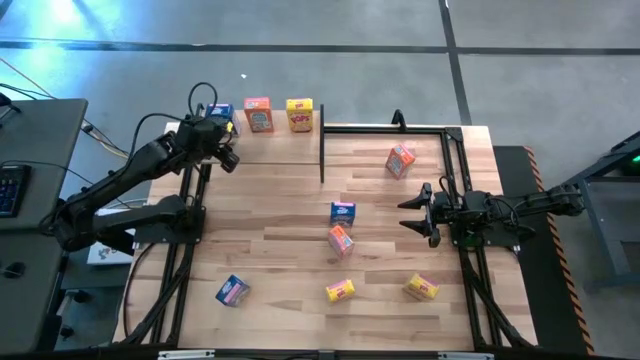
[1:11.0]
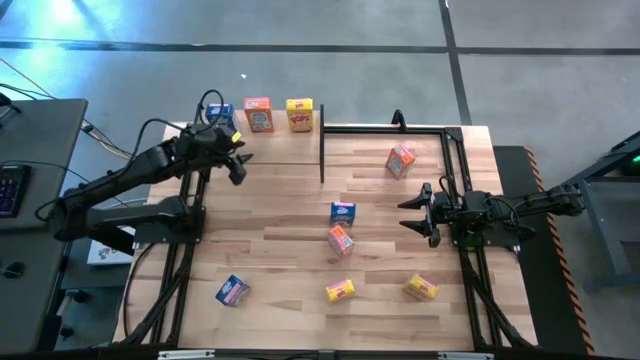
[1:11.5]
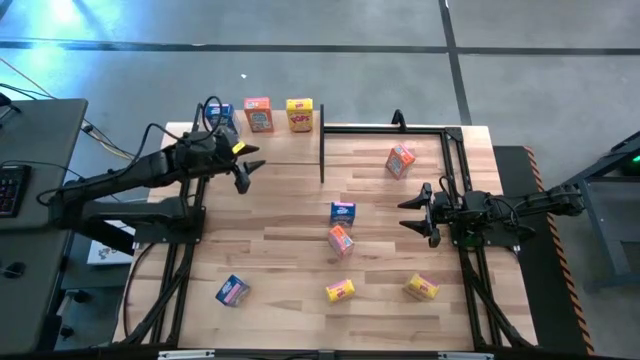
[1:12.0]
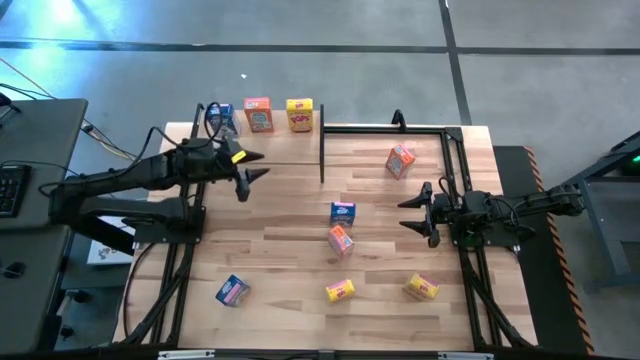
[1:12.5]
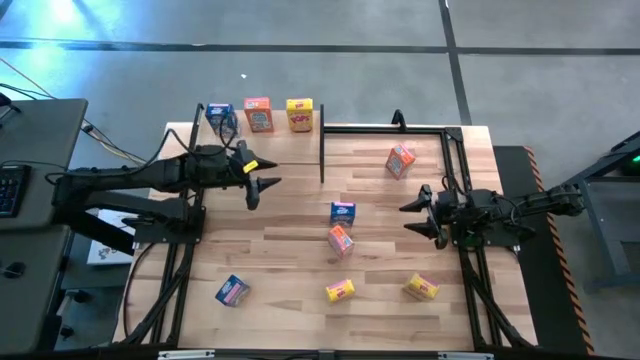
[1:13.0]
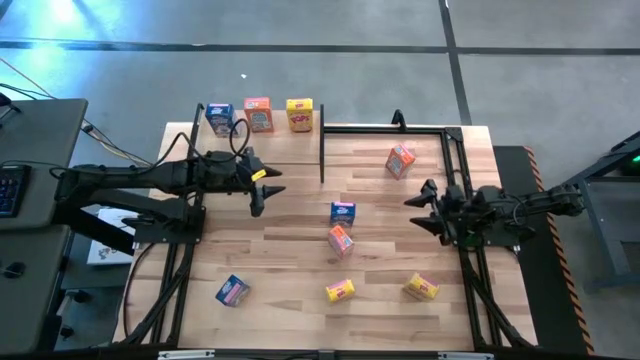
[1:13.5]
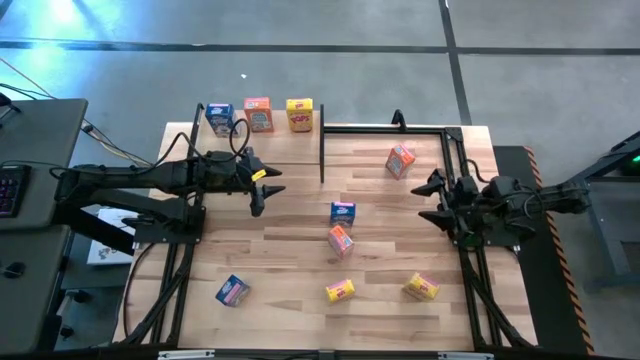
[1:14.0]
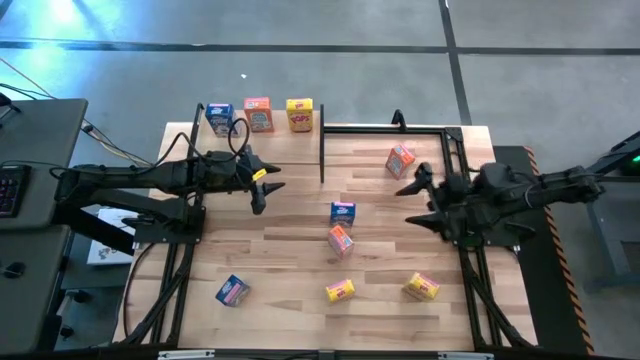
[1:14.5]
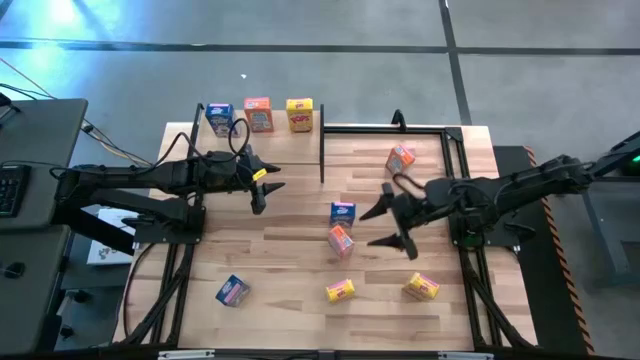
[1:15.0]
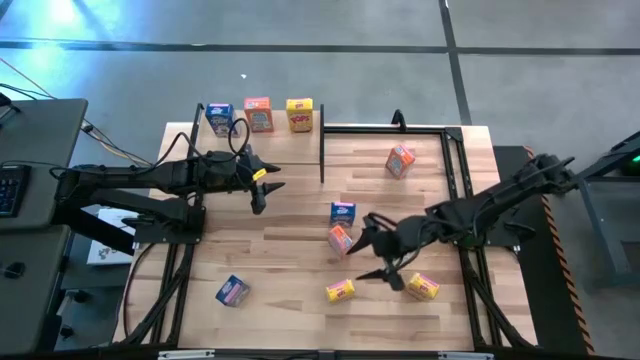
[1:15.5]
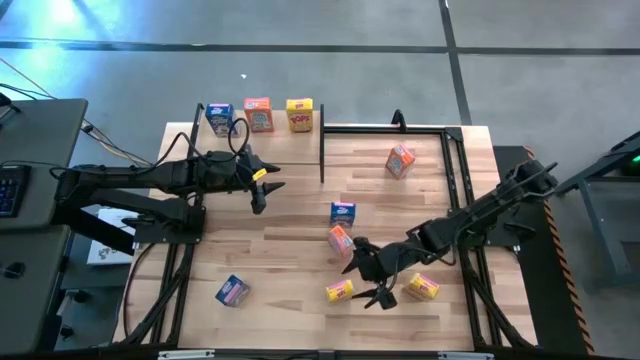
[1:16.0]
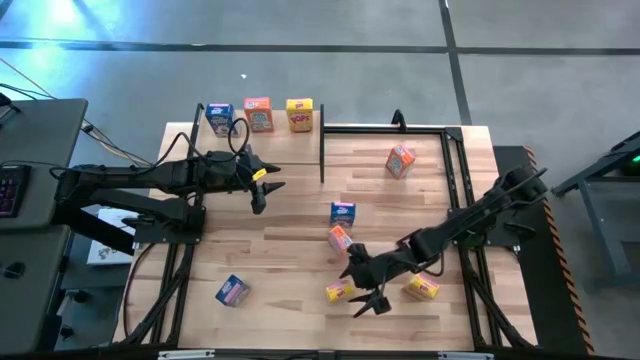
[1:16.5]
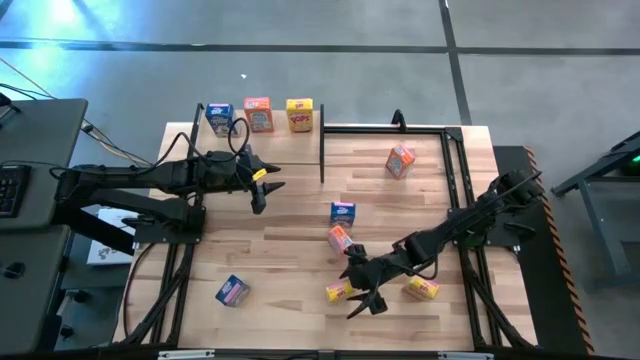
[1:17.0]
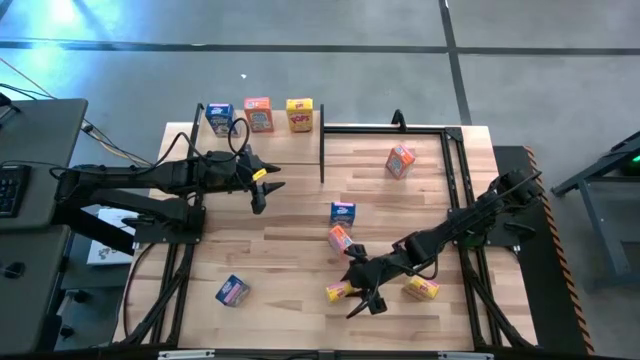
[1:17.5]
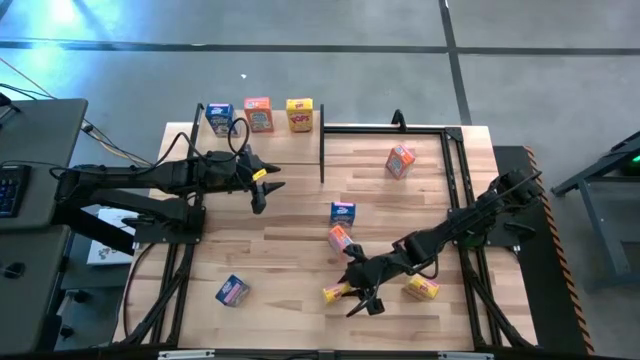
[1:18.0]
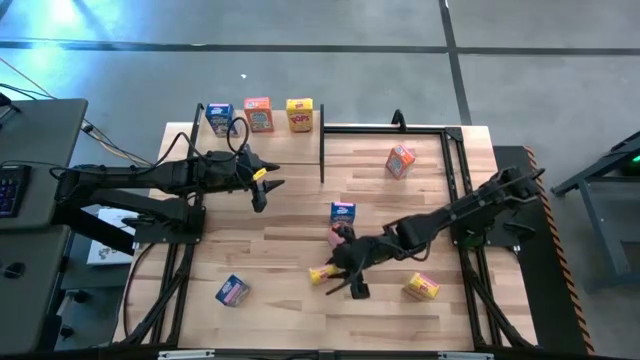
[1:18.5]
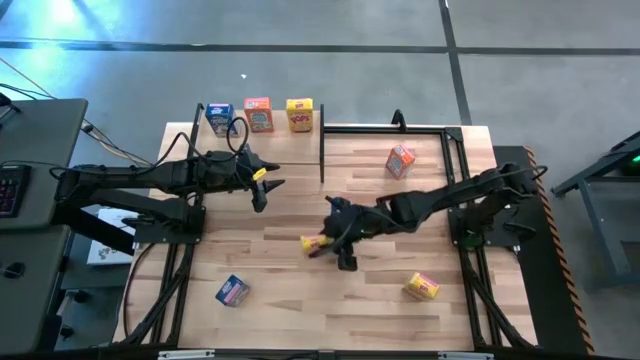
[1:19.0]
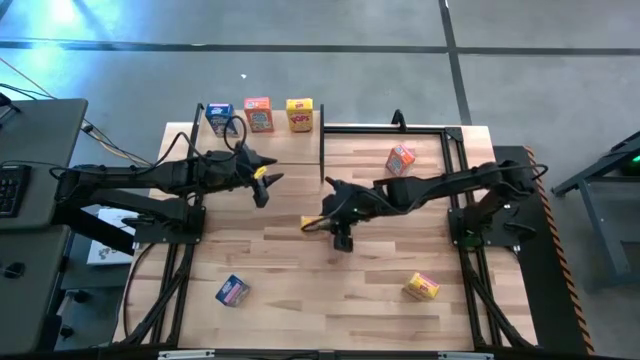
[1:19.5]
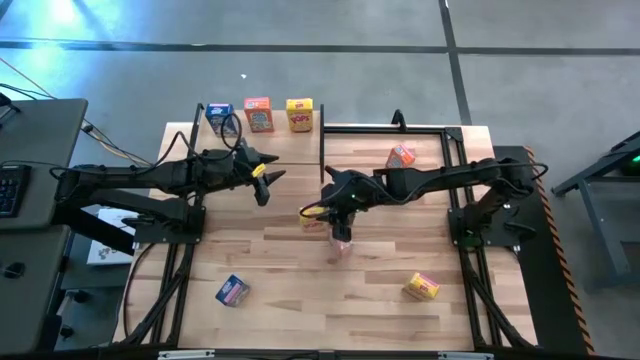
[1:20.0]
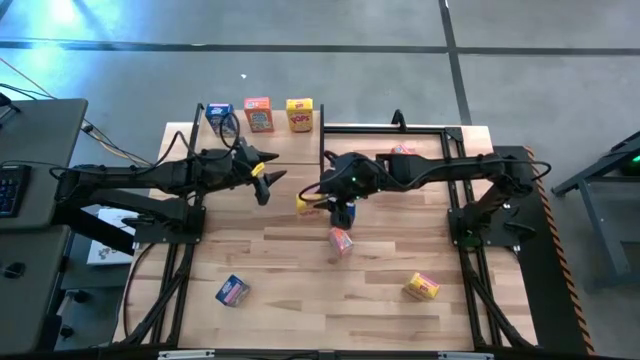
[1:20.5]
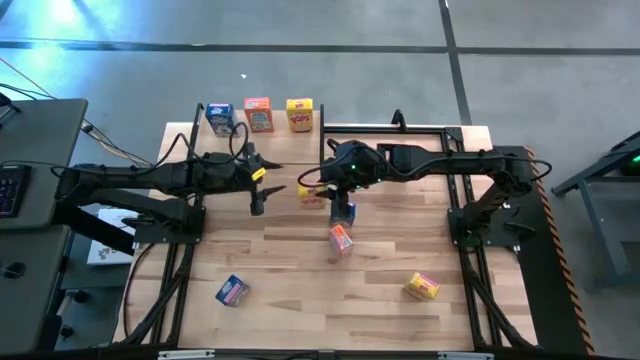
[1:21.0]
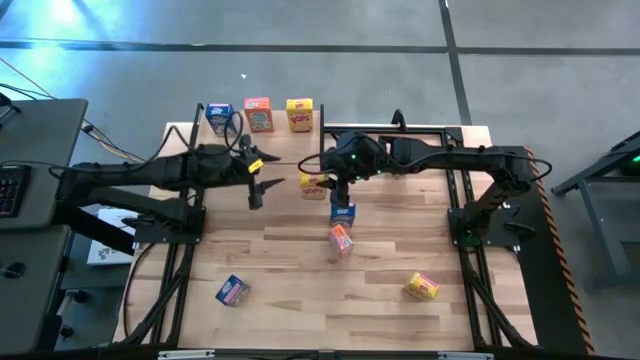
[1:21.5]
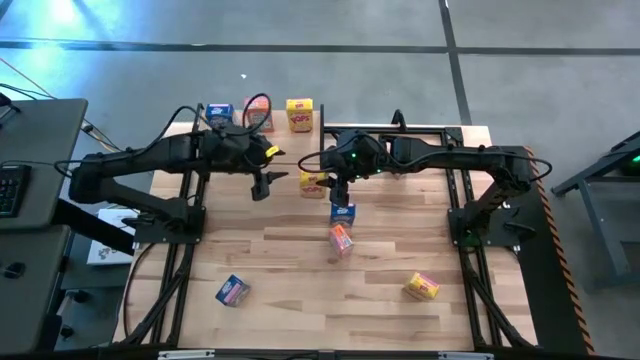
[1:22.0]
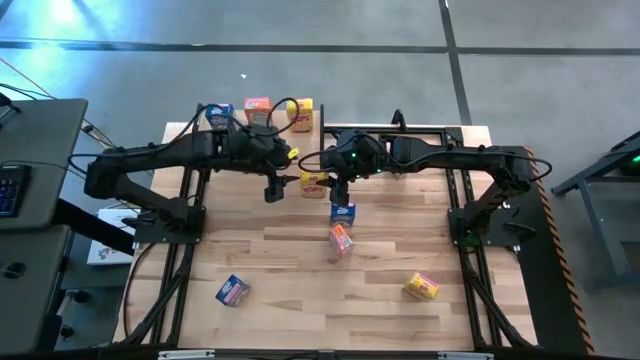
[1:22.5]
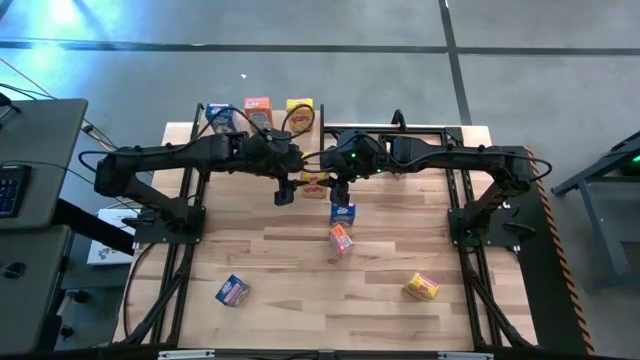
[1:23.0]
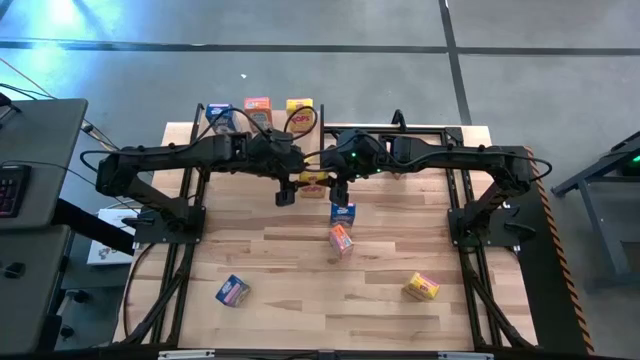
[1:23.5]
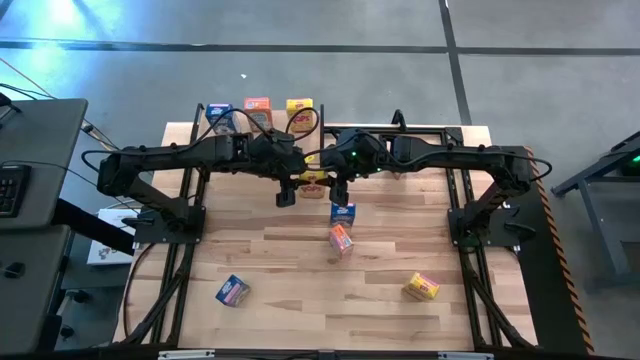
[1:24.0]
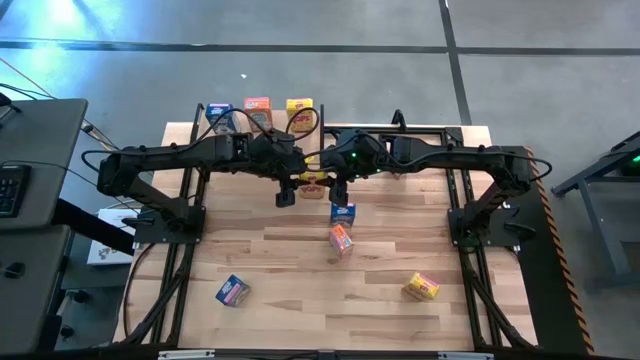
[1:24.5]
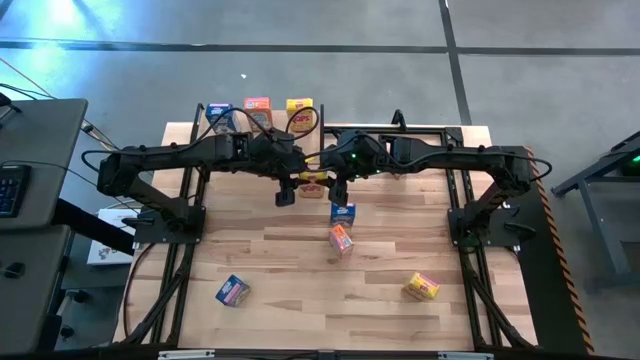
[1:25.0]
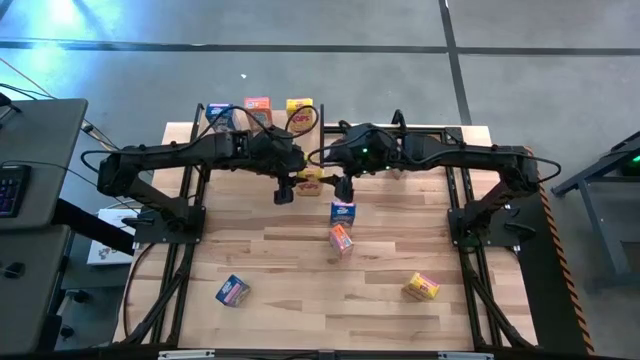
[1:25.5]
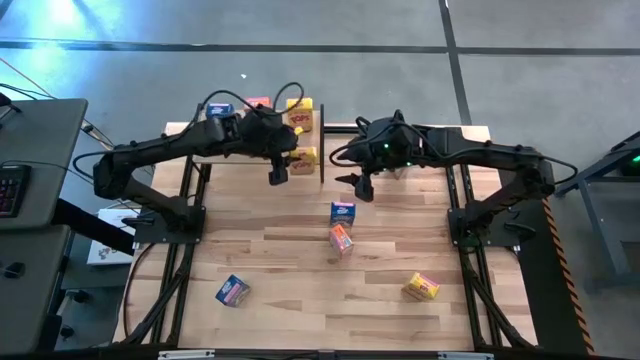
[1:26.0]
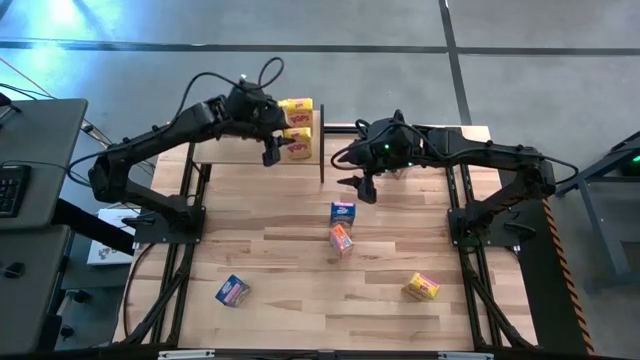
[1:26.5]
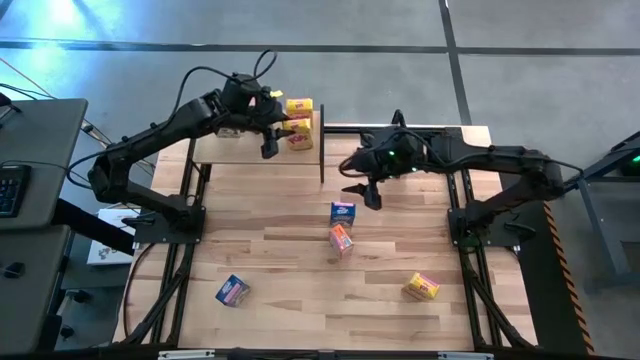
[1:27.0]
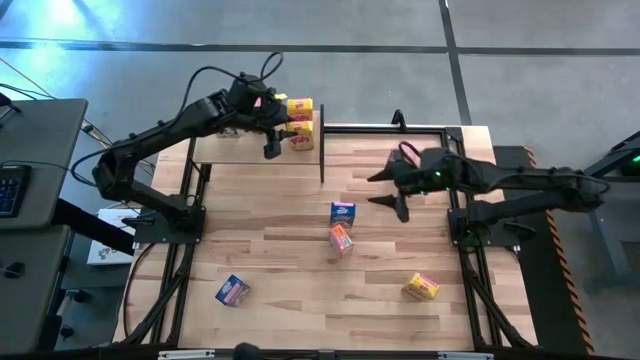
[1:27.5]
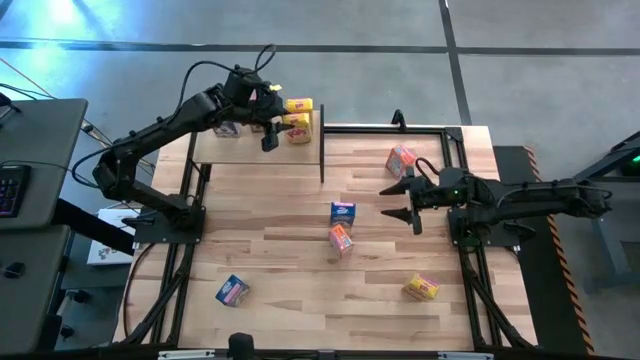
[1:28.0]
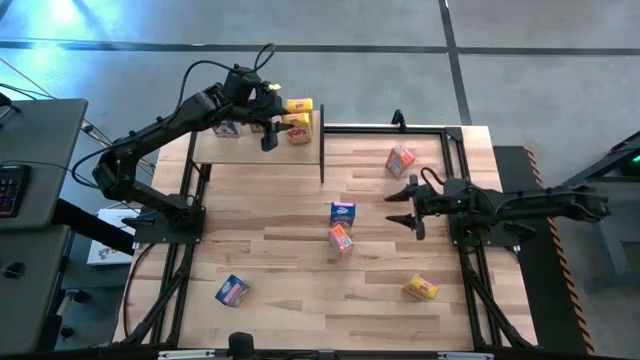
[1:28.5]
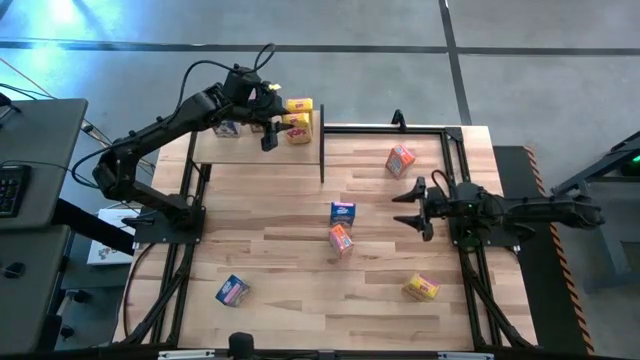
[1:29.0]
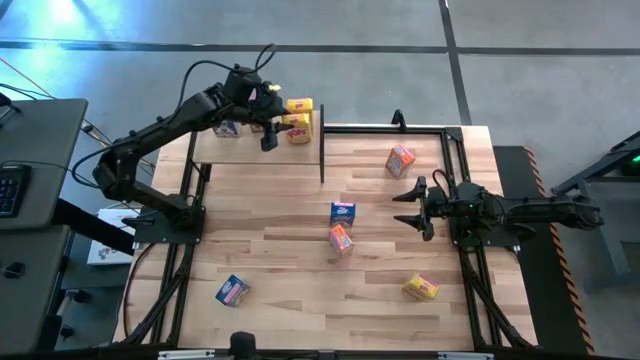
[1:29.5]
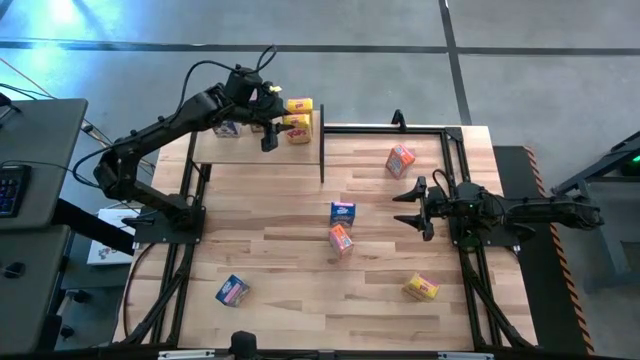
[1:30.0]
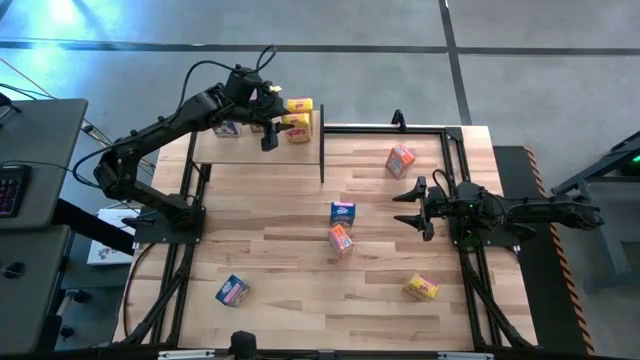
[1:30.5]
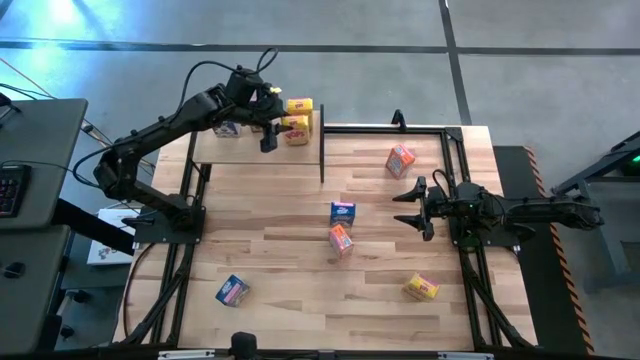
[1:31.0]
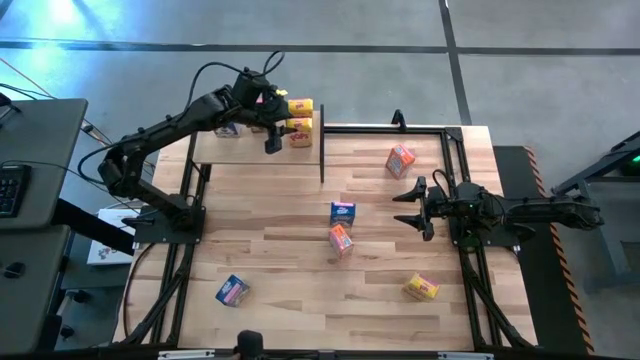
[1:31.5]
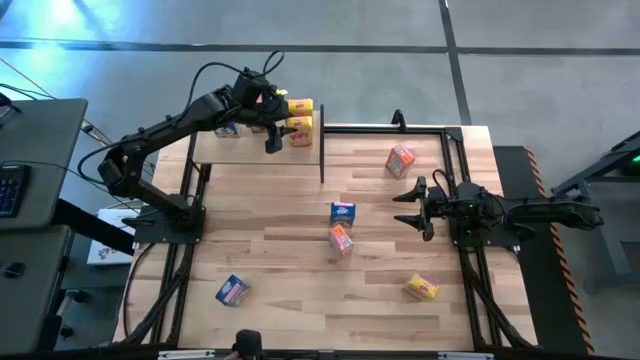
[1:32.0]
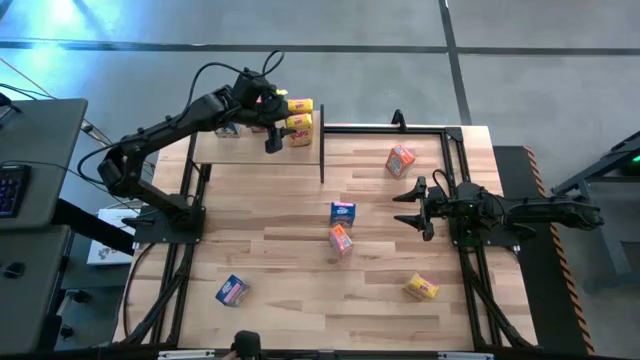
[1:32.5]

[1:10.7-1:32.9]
Task: Stack cereal on shelf
Put the left yellow cereal box on the shelf aligned with the other yellow cereal box
